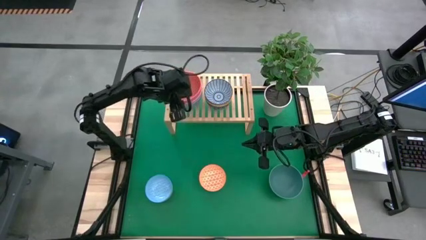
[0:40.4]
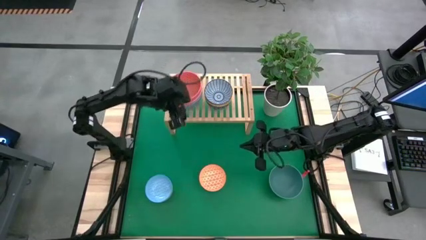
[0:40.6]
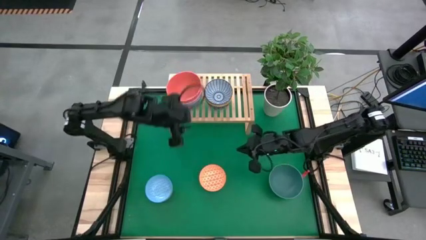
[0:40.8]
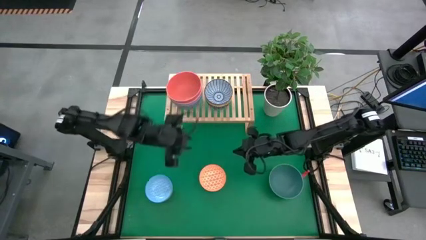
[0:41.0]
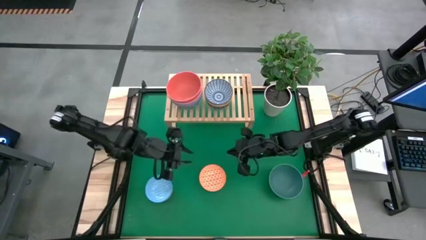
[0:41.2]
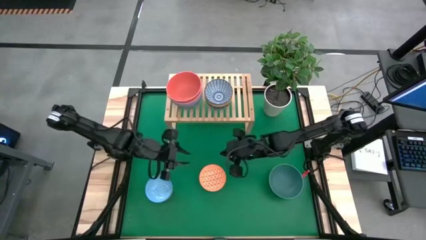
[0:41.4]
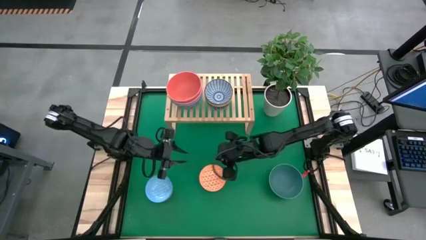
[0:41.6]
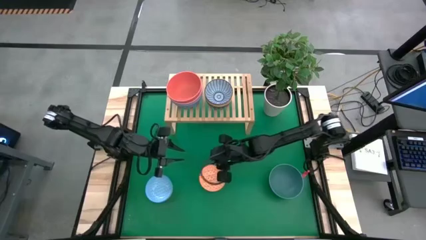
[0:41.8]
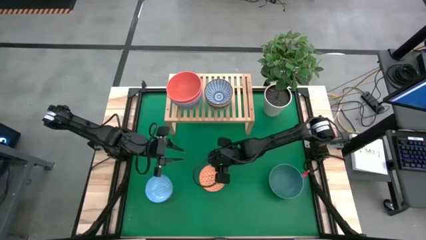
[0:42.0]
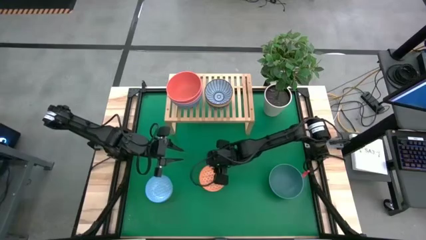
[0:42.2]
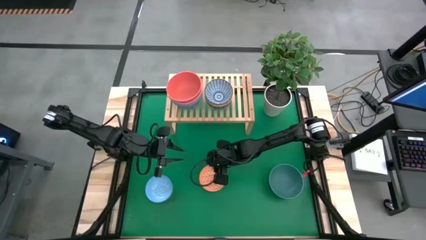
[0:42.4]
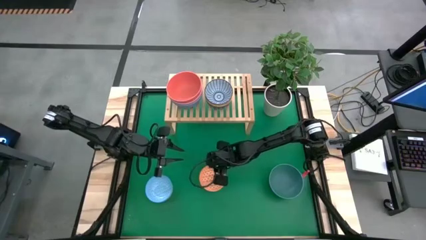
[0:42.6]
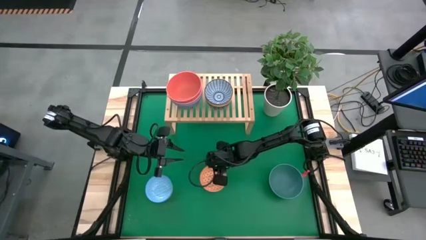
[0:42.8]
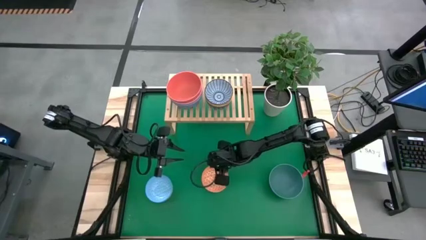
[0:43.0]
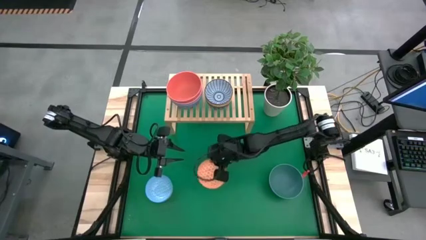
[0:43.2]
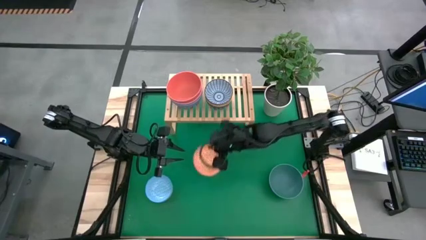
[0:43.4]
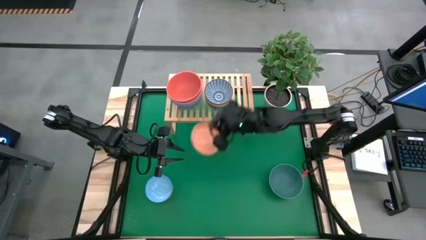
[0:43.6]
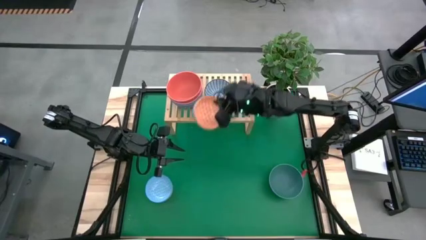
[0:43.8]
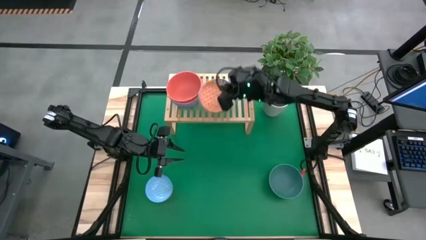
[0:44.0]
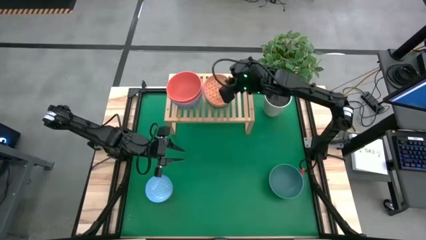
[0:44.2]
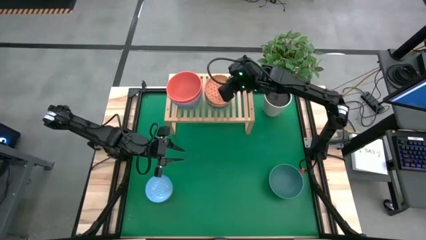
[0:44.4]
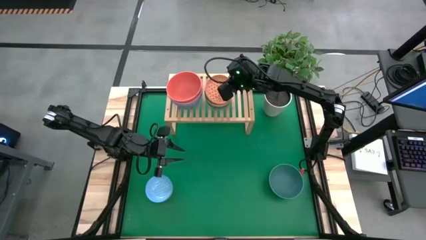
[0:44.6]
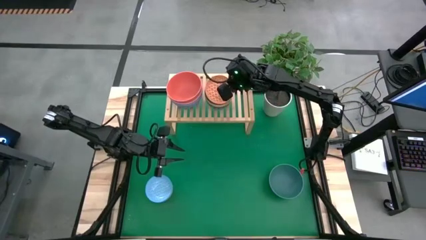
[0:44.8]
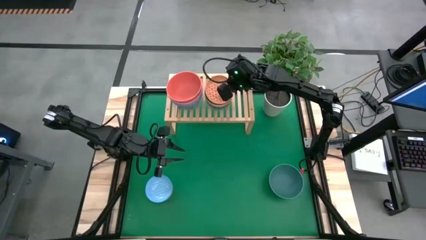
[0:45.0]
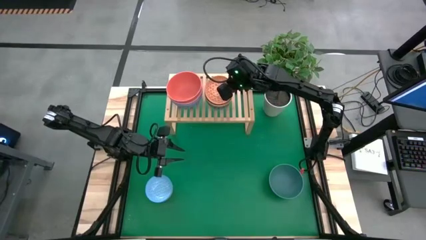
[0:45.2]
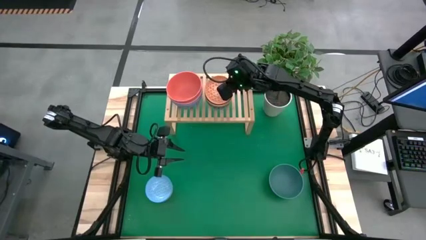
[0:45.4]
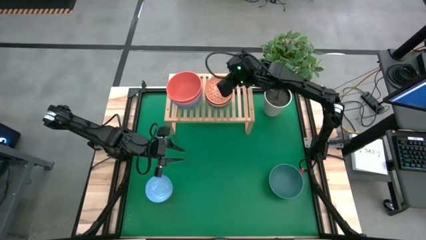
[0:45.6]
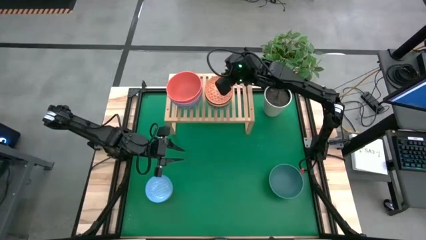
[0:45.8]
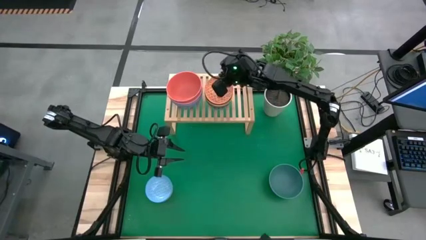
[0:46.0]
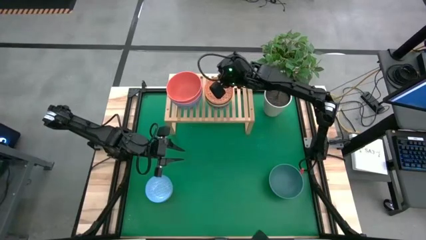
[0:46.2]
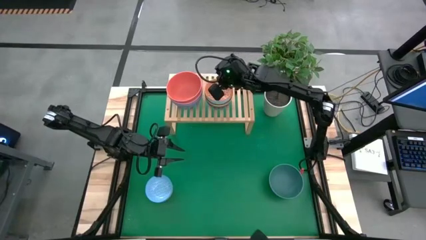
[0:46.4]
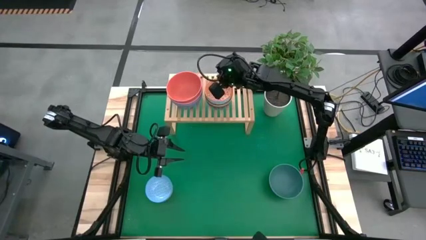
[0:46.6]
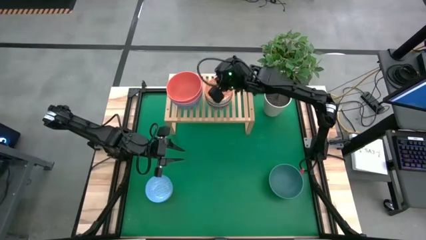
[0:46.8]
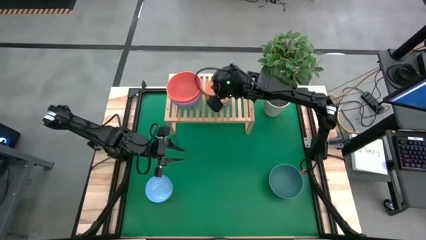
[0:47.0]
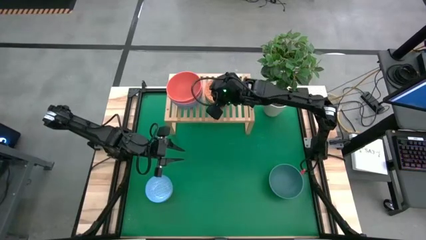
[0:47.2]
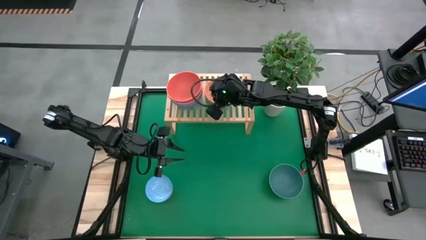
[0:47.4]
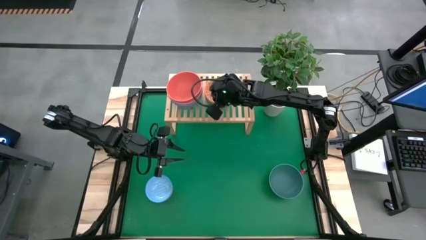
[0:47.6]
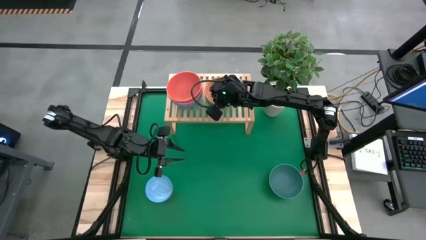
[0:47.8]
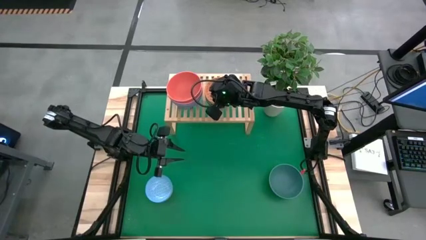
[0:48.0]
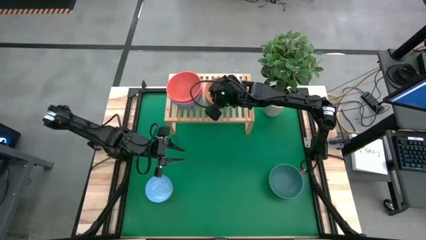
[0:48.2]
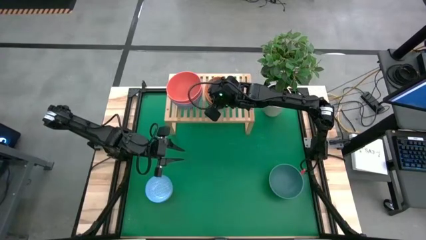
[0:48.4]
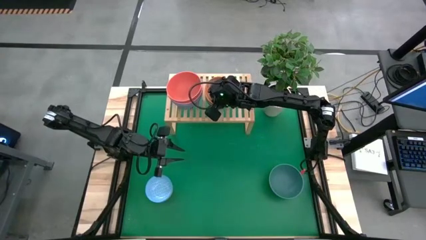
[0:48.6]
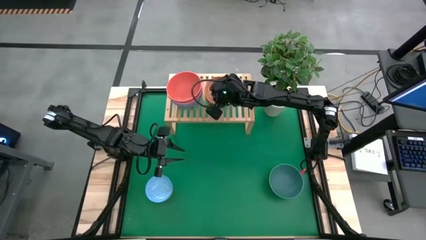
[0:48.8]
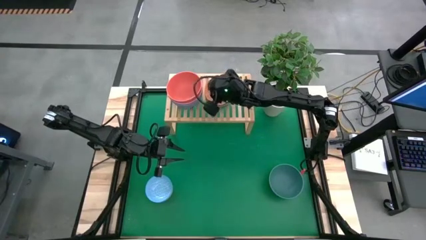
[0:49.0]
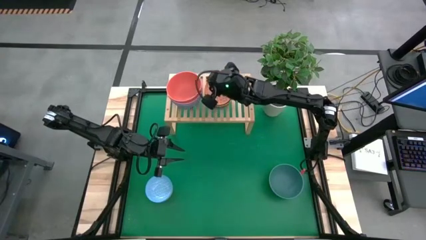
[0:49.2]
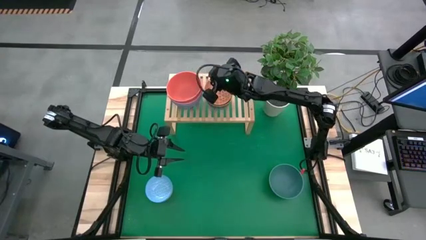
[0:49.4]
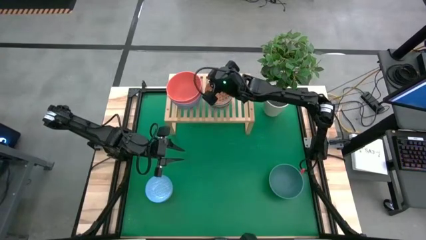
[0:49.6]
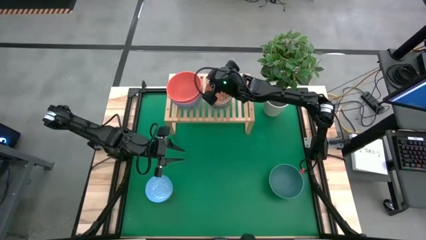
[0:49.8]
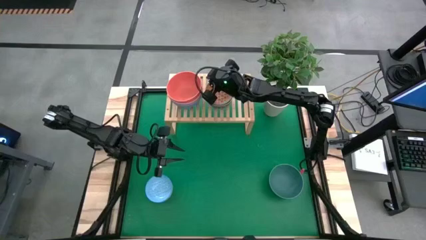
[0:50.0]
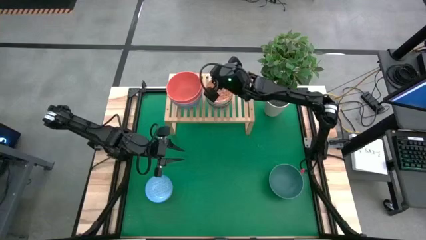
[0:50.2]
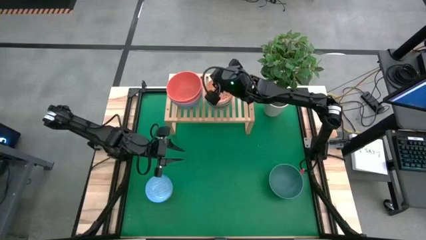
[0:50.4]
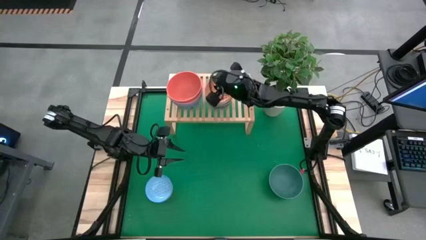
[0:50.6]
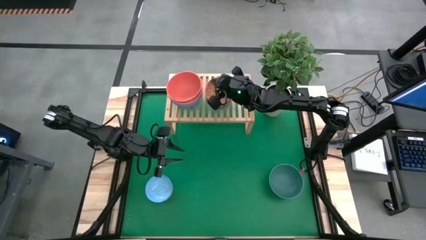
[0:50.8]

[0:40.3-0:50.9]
Task: Place and stack bowls onto a shelf
Stack the orange patterned bowl on top of the dark blue patterned bowl on the shelf

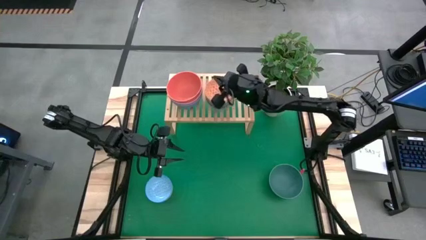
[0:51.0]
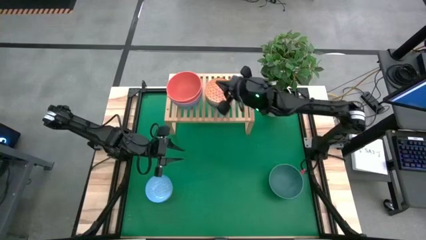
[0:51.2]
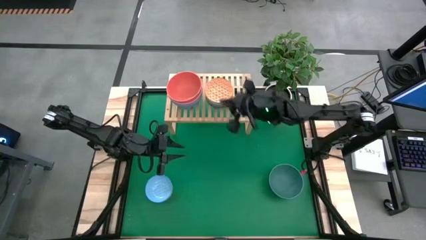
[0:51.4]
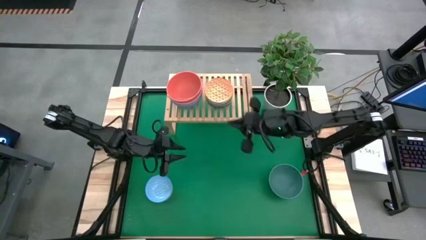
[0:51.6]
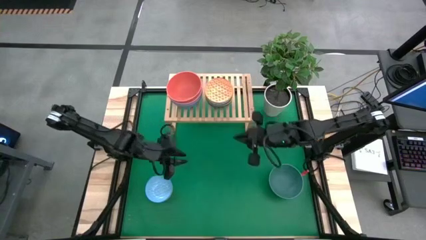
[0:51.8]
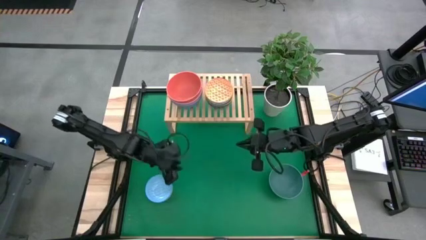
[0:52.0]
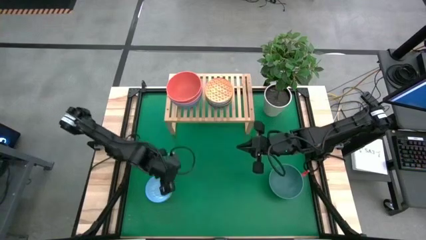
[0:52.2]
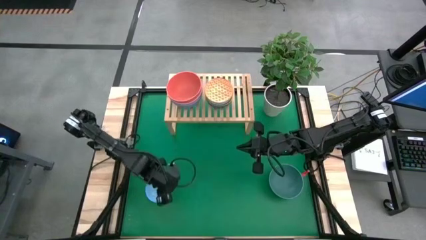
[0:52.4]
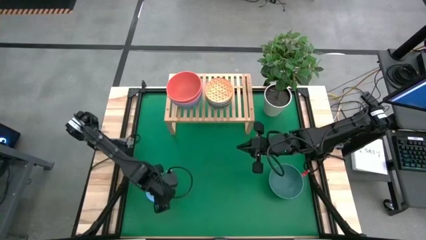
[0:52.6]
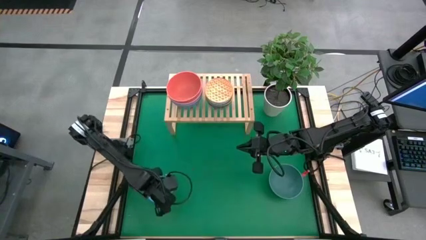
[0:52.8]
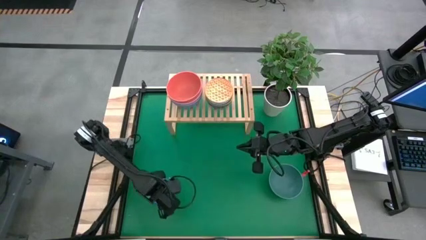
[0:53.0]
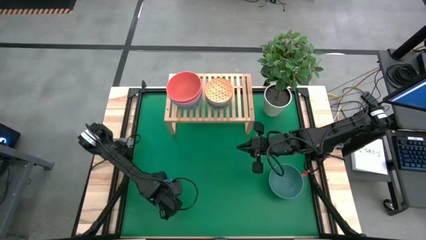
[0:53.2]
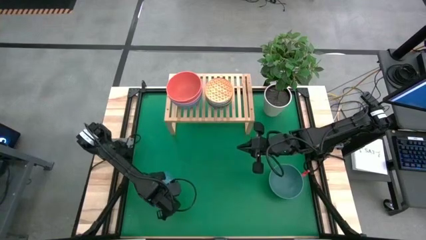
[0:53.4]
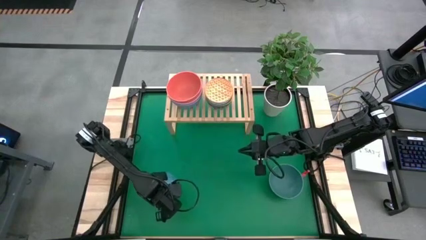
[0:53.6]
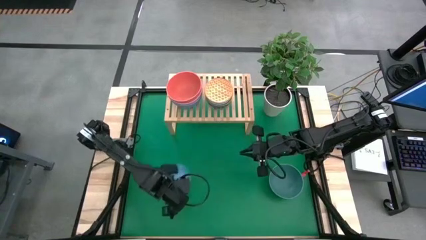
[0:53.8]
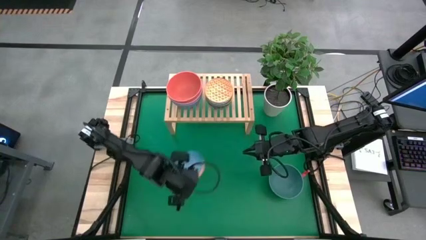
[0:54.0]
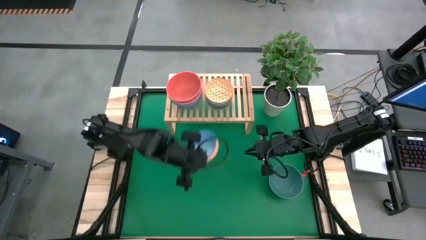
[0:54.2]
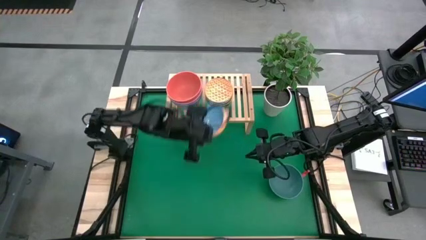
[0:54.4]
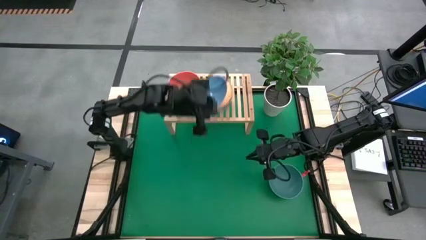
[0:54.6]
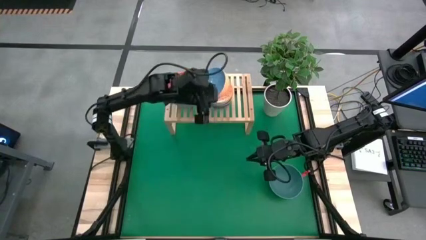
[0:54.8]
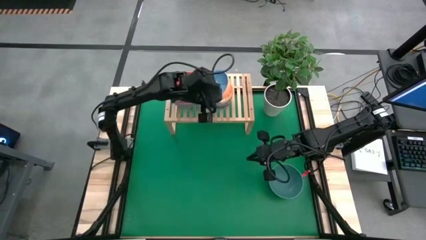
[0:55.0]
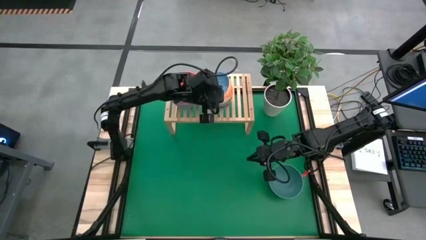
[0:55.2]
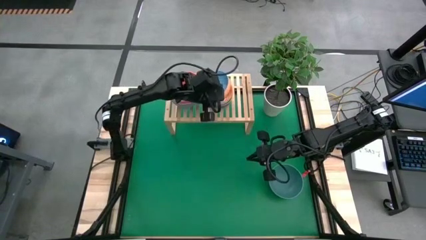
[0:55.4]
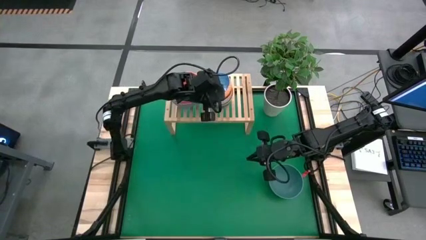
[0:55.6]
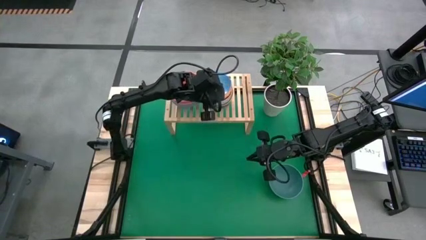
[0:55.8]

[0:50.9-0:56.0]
Stack the light blue patterned bowl on top of the orange patterned bowl on the shelf

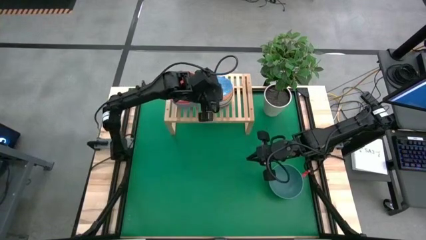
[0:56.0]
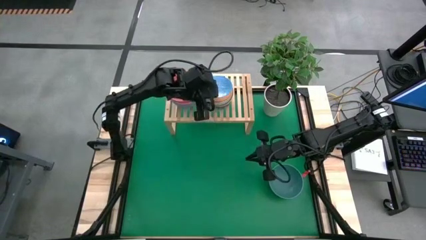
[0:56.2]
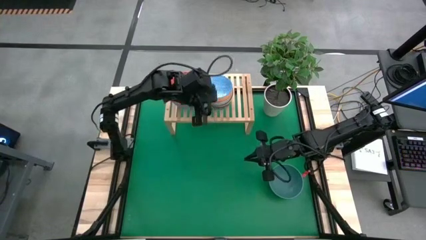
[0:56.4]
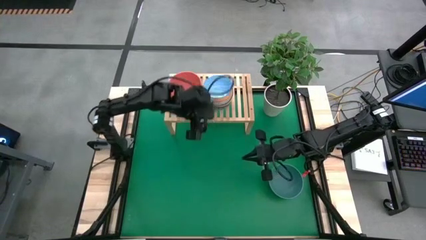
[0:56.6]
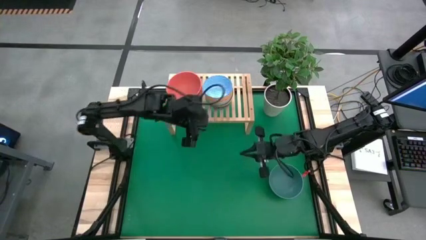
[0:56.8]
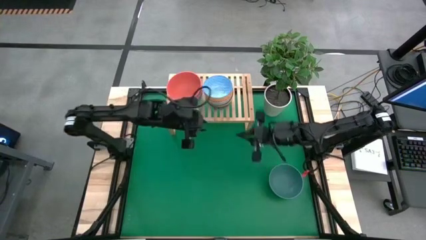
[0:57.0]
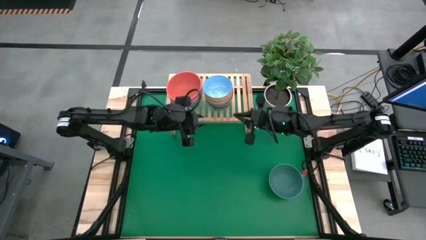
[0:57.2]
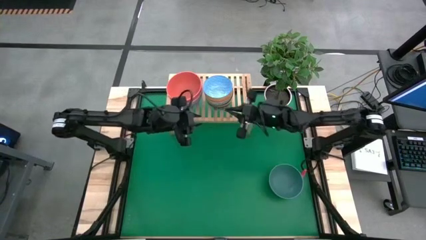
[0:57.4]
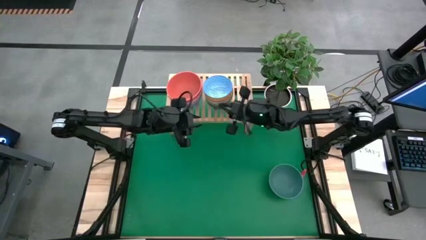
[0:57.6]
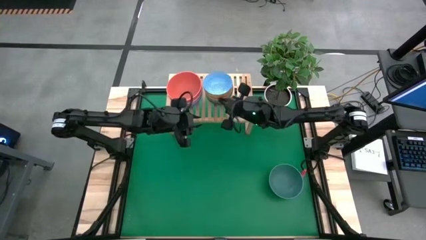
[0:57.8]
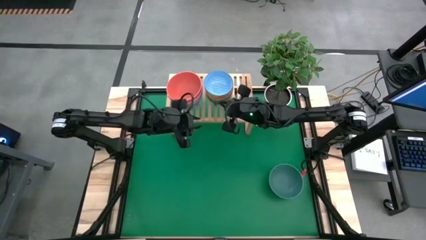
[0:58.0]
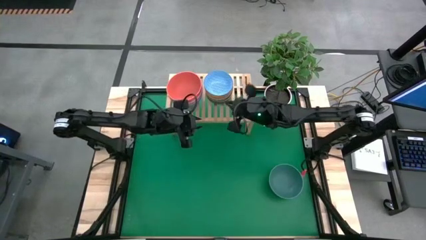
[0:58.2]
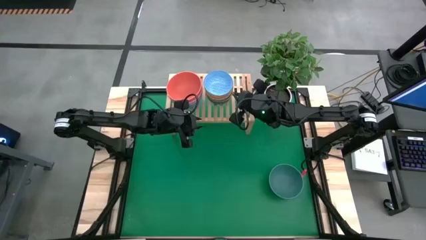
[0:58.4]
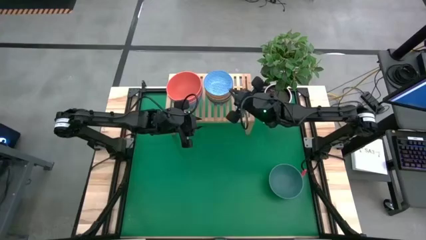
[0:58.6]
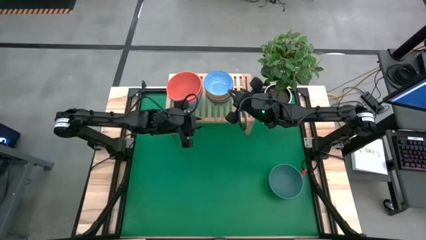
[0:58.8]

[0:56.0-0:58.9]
Adjust the bowls
